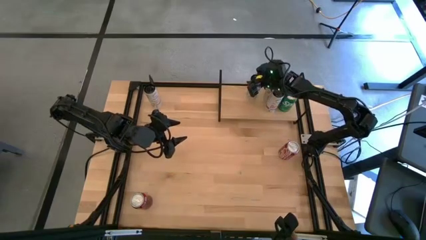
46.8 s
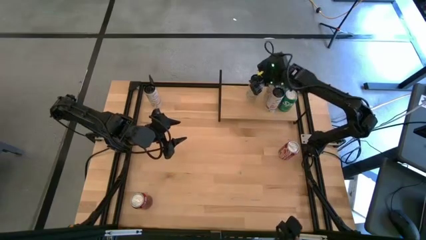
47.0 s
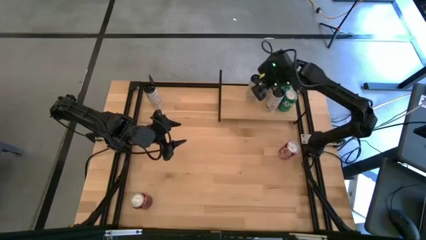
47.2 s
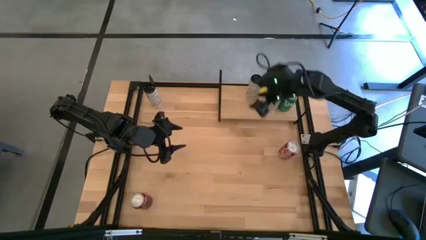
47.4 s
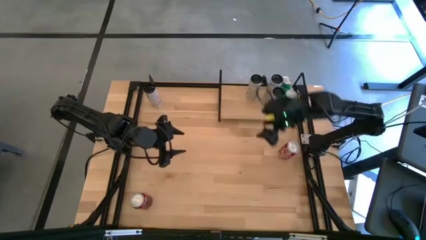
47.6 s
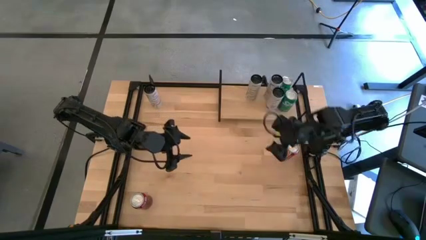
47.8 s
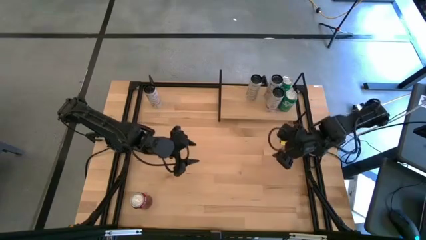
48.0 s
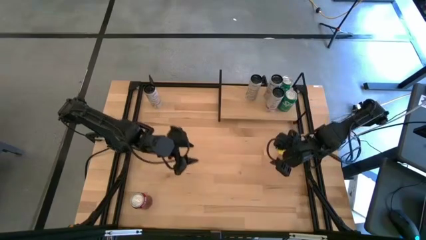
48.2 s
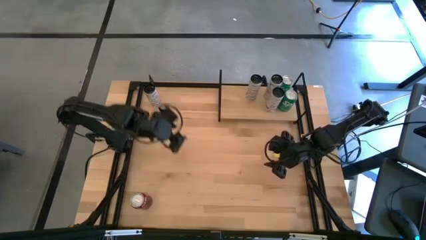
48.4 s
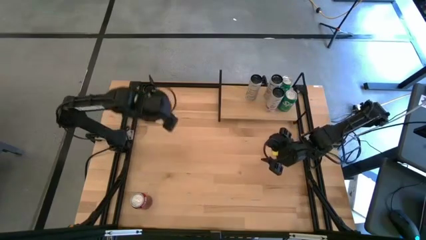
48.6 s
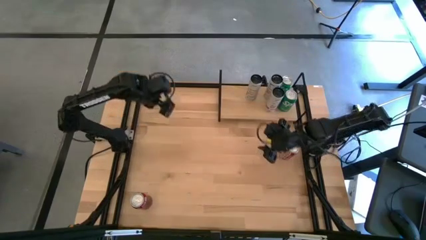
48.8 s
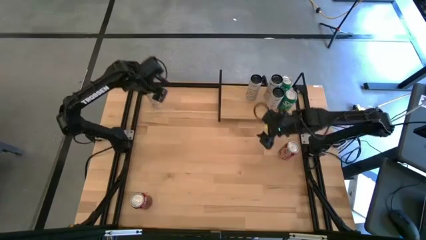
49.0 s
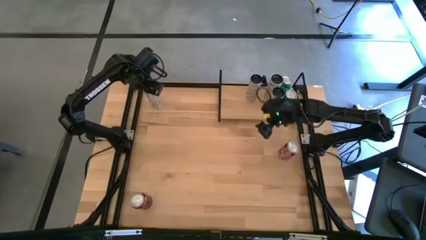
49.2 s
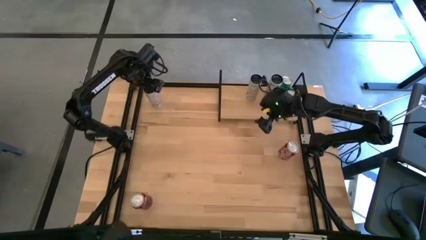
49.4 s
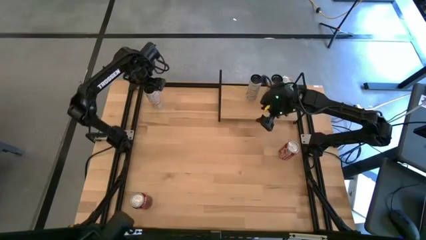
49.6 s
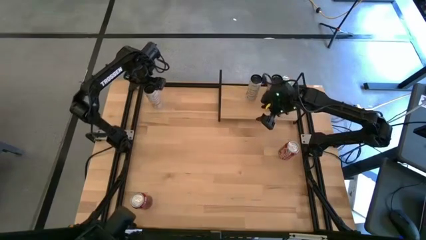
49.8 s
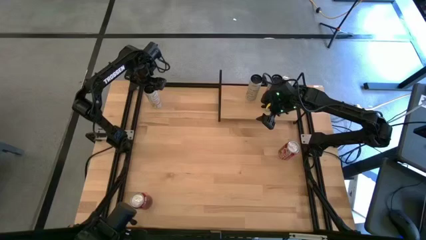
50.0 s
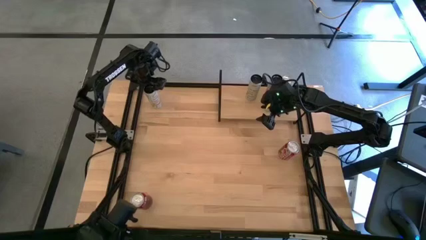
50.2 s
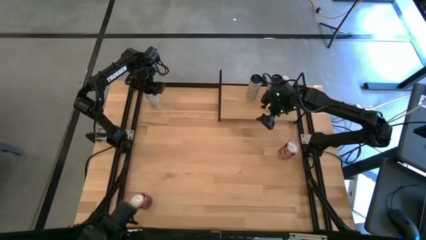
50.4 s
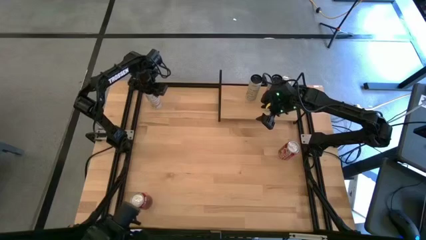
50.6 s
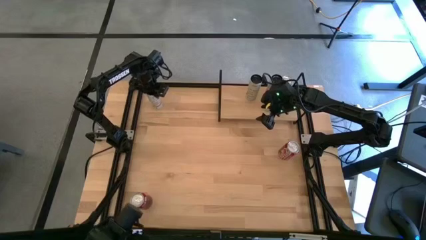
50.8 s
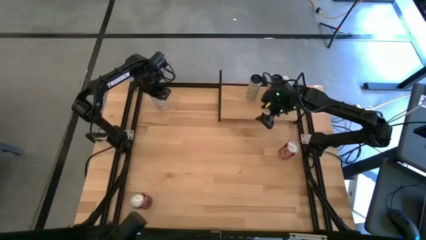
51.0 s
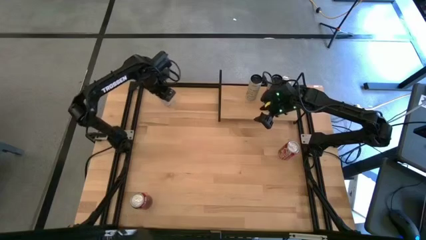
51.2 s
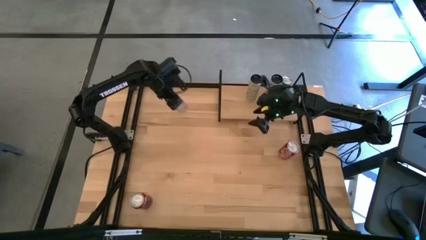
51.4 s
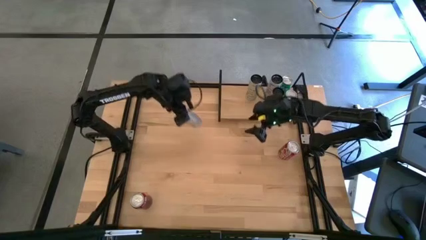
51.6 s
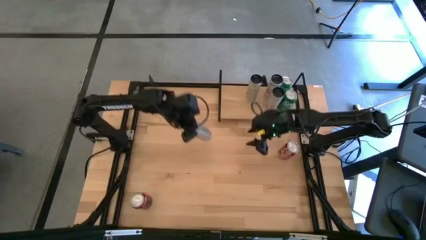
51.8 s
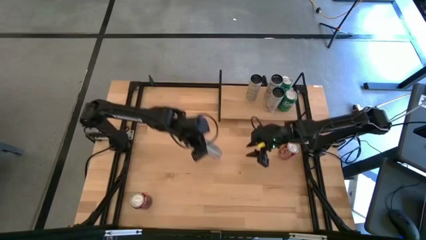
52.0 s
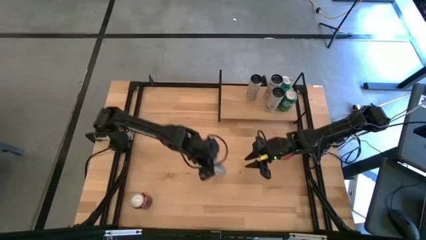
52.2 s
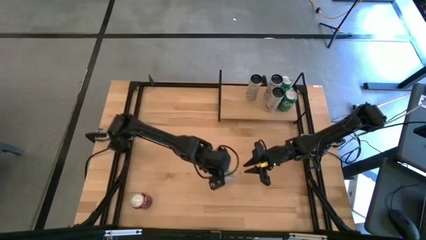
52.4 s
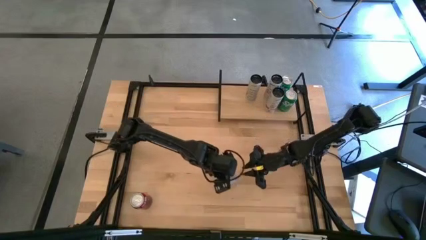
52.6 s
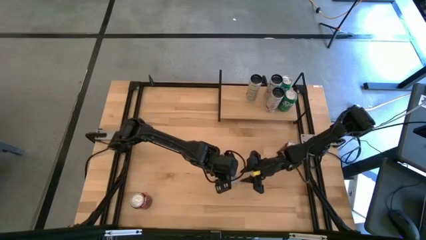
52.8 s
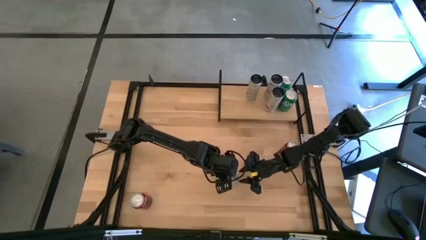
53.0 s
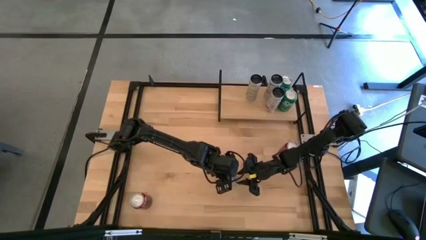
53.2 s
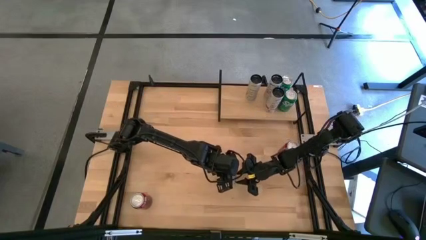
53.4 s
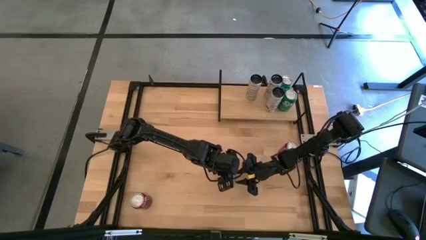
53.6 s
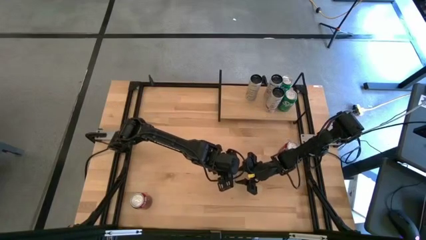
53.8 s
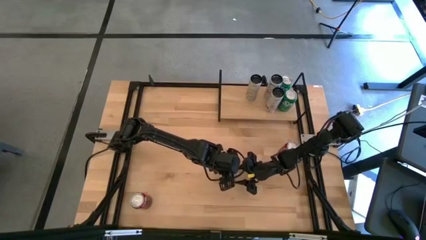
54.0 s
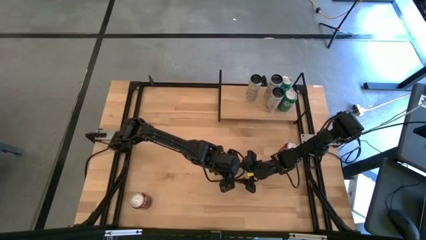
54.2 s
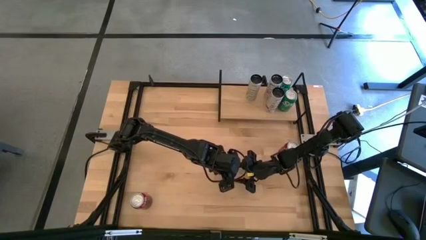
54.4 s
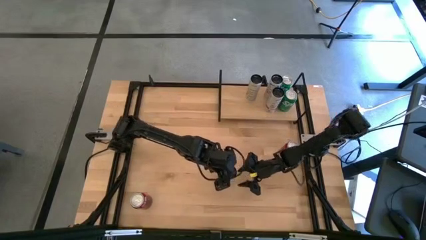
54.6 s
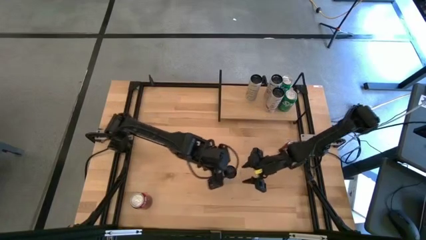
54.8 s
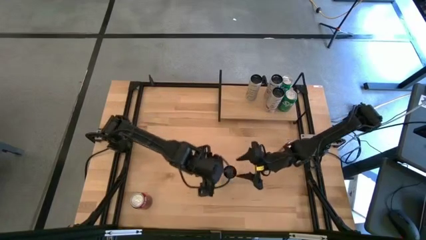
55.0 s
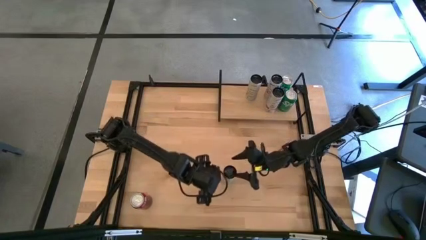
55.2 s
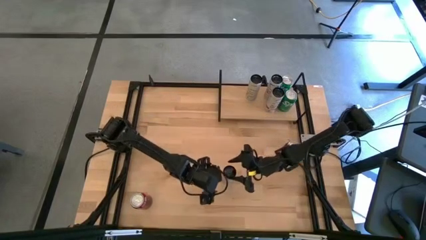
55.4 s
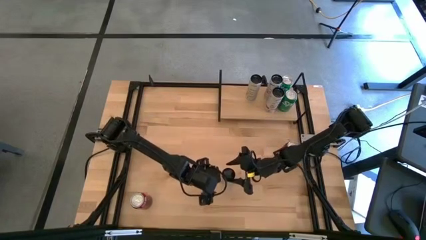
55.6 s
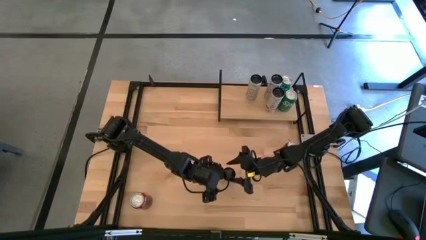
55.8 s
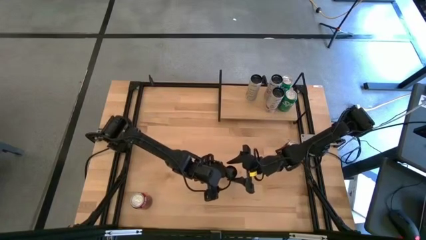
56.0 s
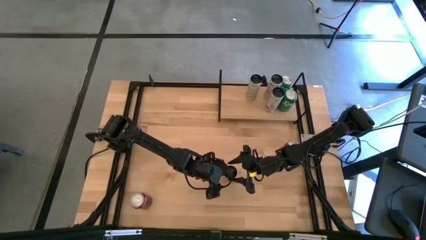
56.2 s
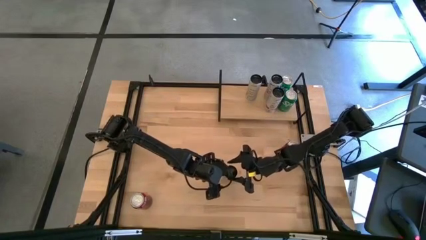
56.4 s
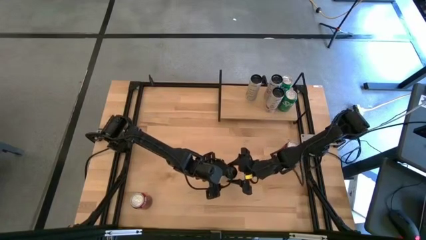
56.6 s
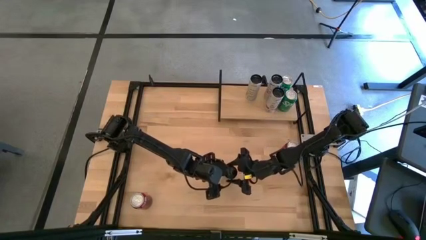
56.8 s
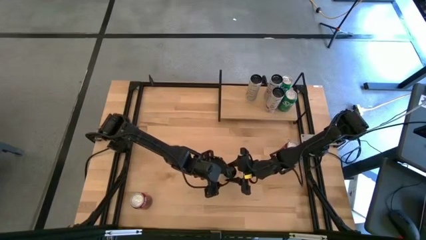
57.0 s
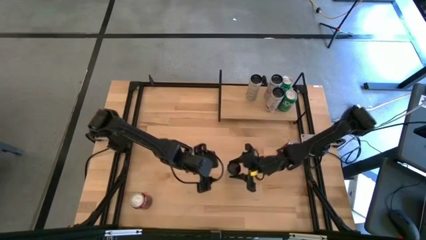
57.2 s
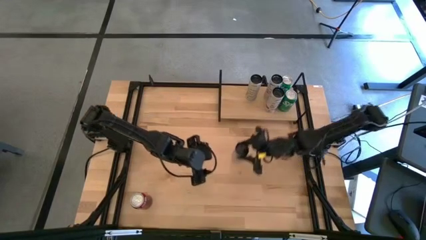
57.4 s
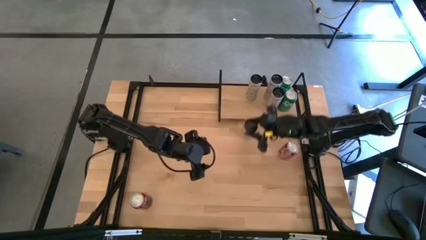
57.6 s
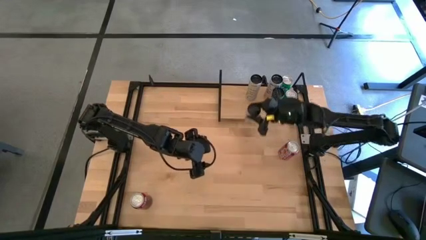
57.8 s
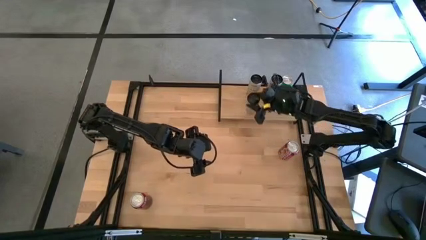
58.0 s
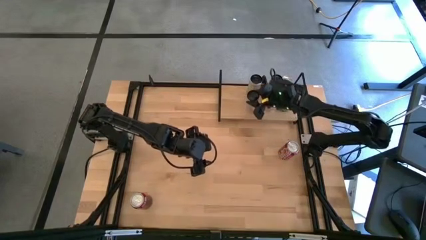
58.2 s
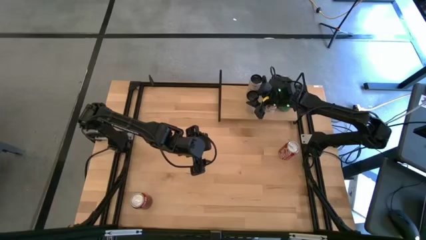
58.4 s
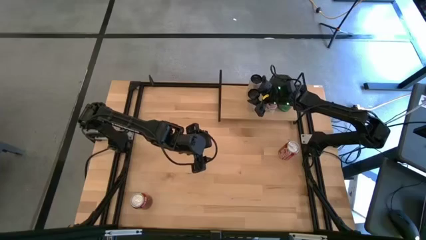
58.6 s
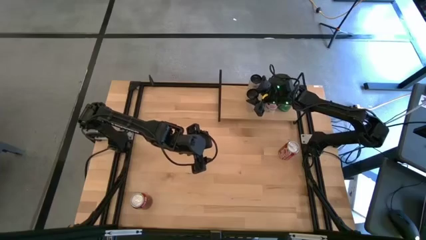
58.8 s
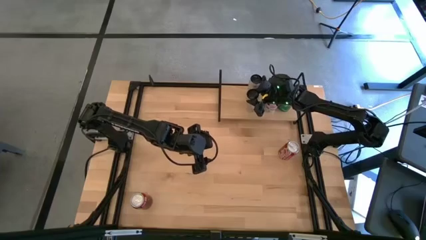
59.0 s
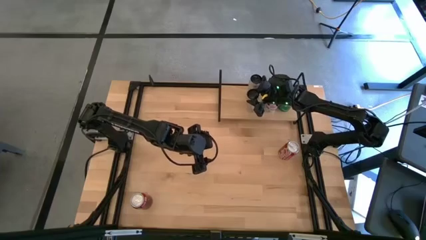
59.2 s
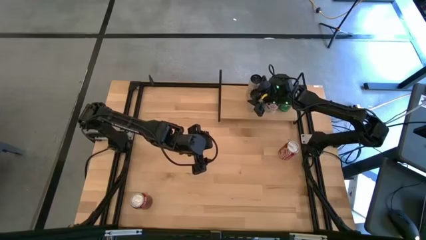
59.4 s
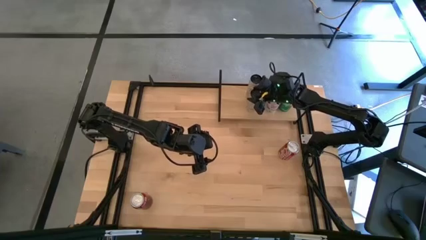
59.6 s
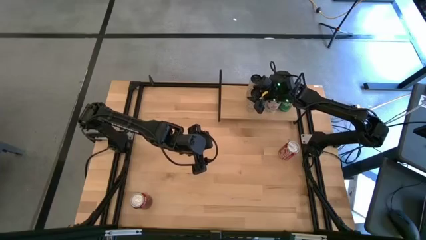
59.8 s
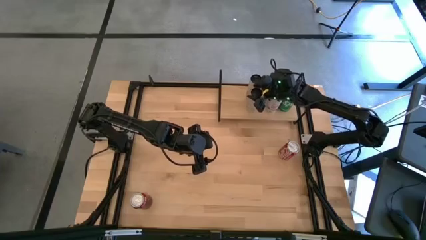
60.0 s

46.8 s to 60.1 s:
Task: Place canned beverage on shelf
Put the white yellow soda can on the shelf aligned with the other white yellow soda can

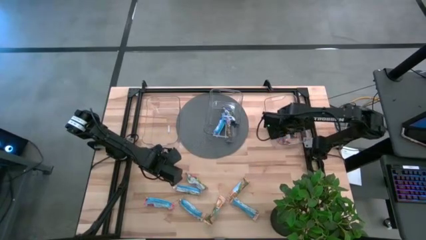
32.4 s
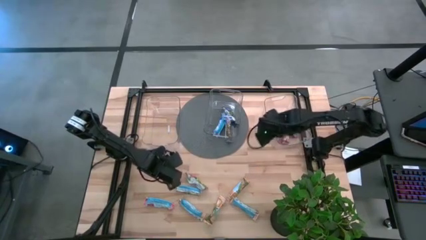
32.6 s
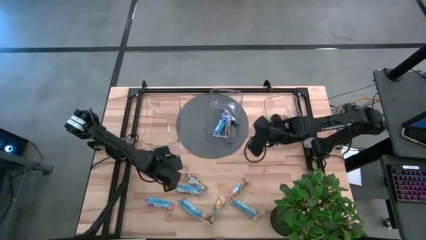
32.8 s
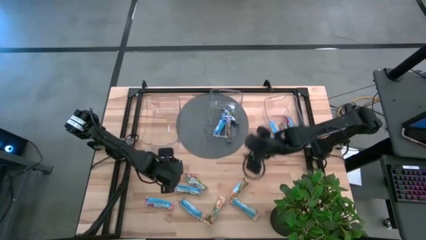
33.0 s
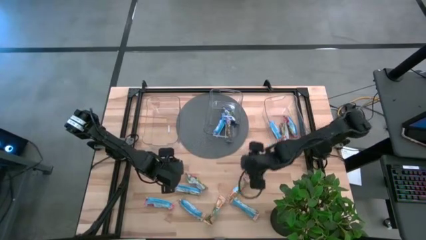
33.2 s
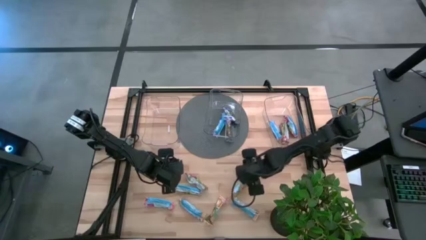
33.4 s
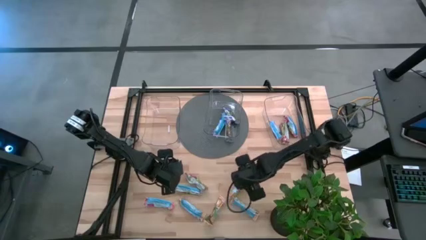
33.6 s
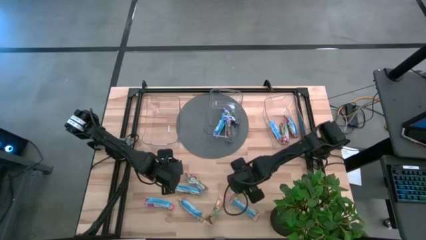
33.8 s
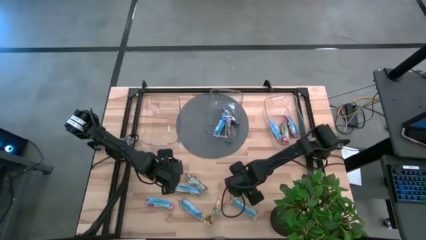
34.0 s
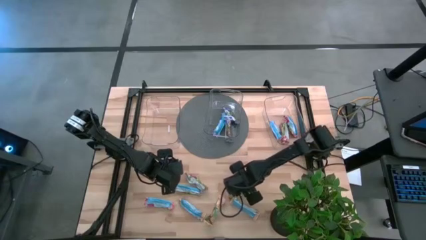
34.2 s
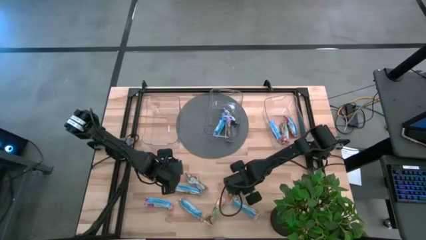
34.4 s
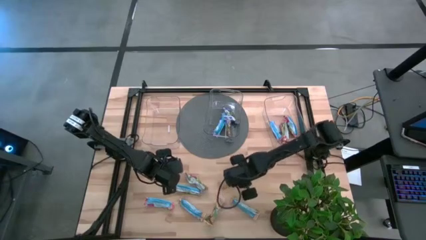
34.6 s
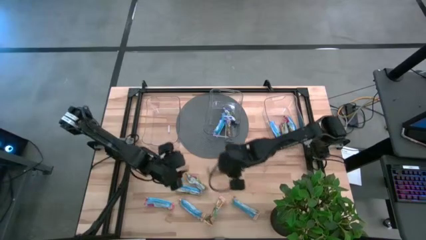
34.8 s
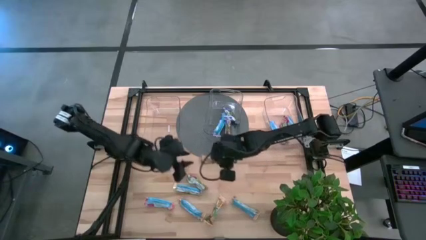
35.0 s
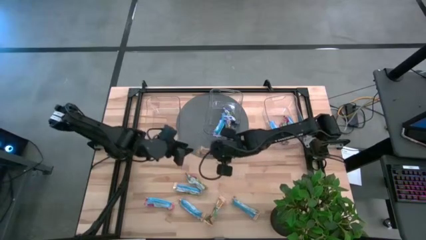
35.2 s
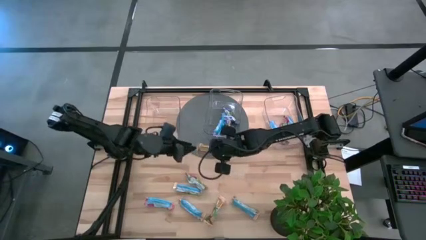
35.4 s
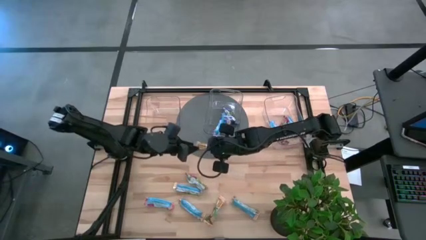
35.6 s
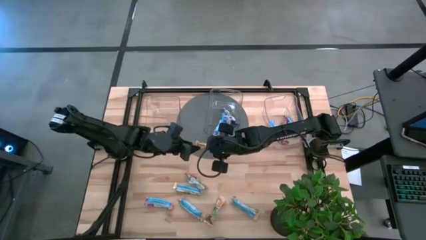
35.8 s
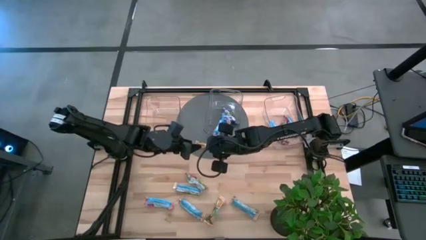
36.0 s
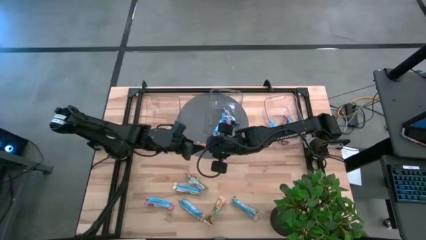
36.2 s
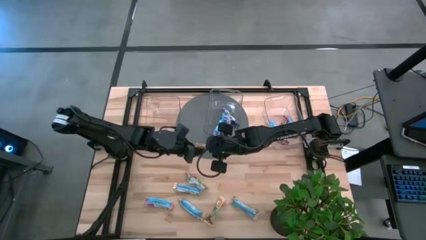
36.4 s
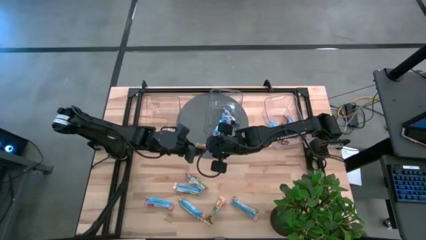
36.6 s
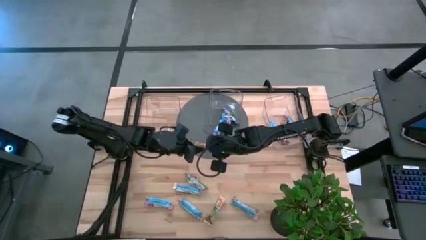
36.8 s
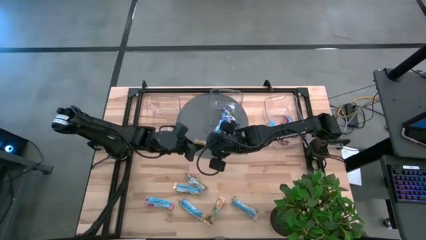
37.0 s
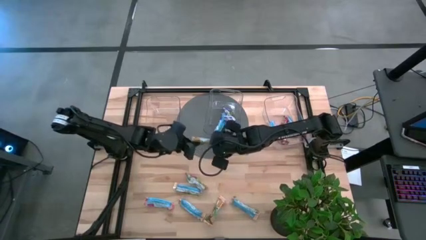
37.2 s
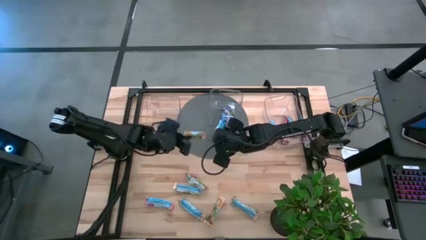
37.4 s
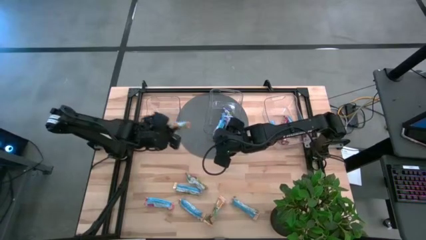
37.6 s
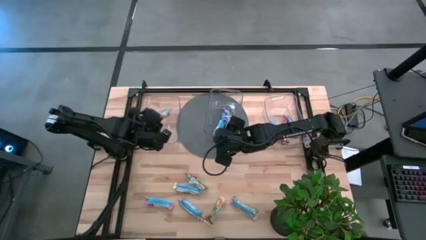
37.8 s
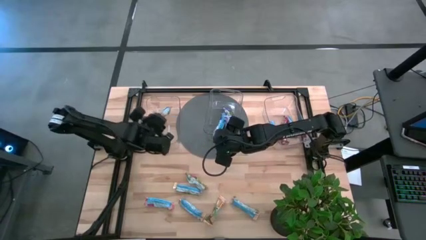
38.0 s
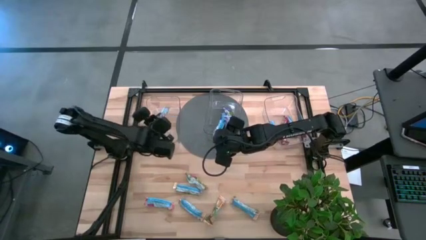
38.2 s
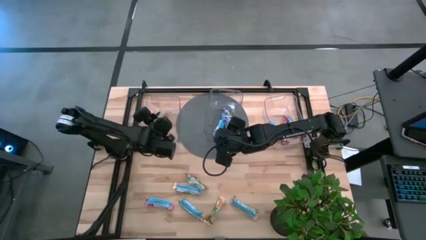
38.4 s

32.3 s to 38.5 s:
Task: Pick and place Granola Bars by type
Put the yellow granola bar into the left transparent bin
